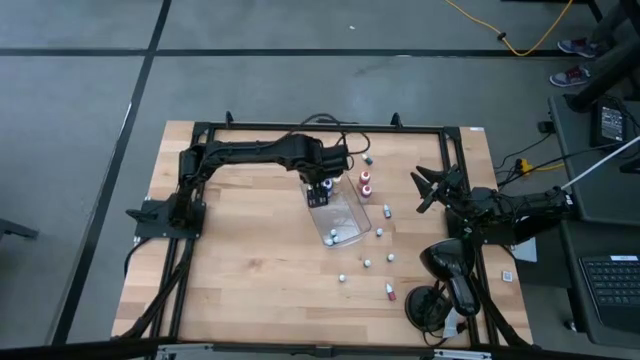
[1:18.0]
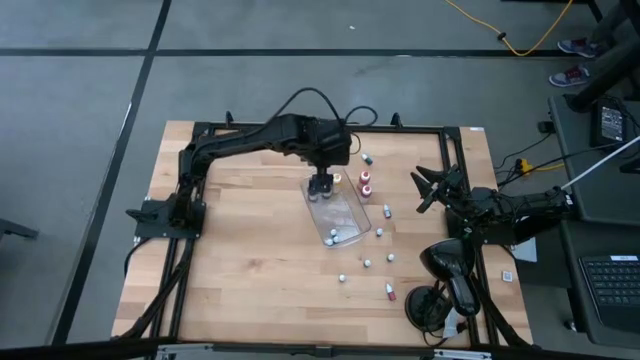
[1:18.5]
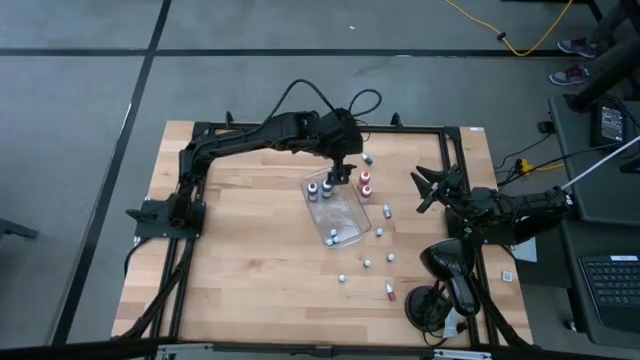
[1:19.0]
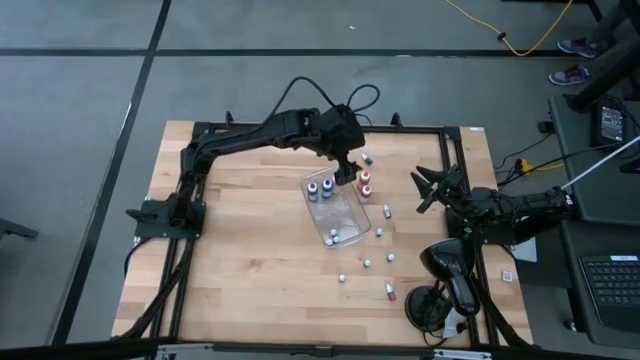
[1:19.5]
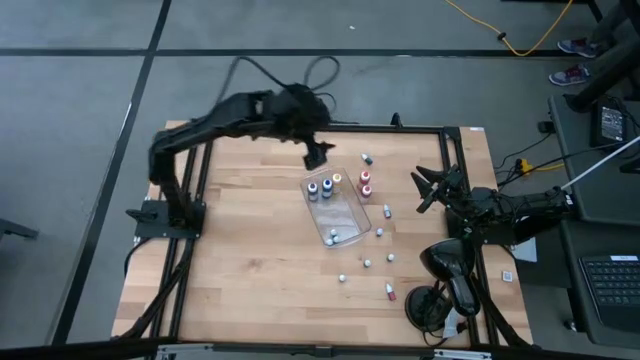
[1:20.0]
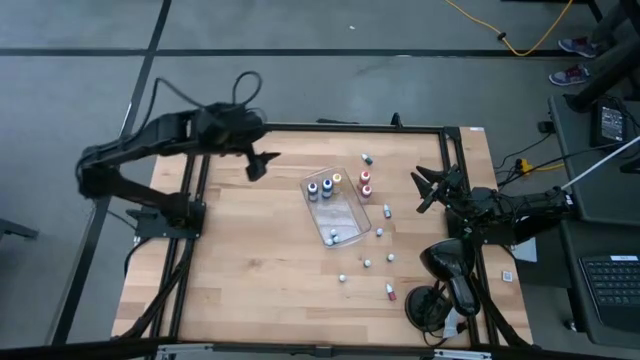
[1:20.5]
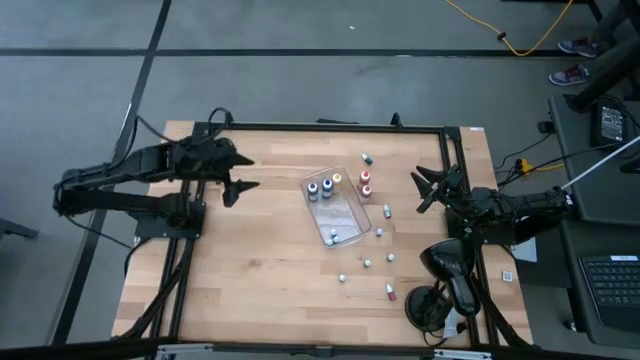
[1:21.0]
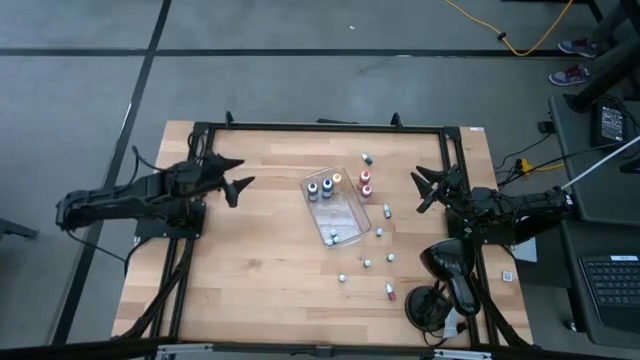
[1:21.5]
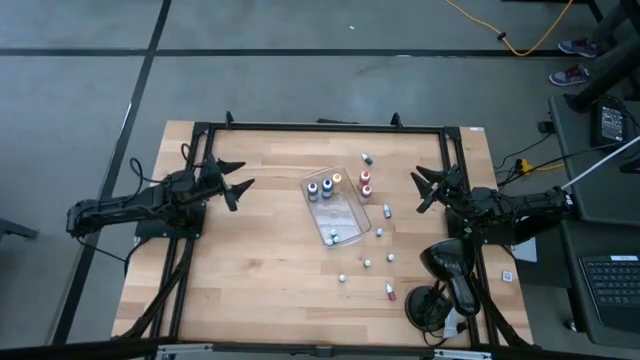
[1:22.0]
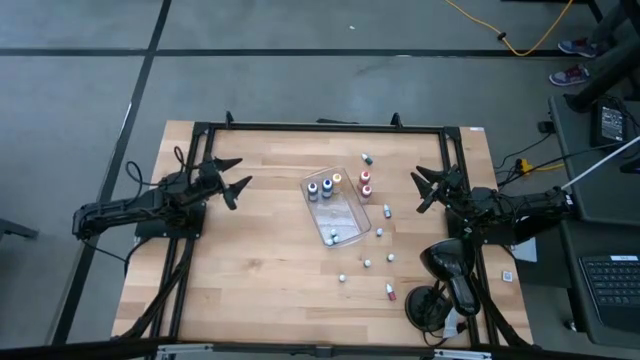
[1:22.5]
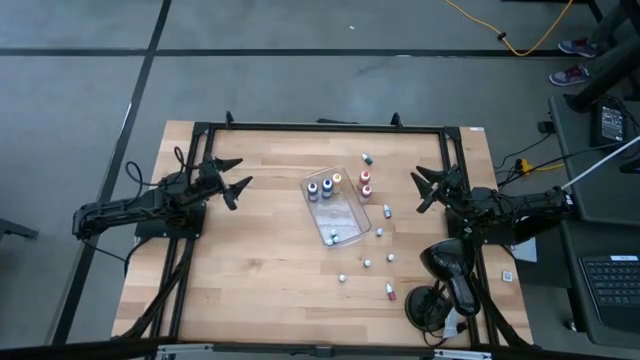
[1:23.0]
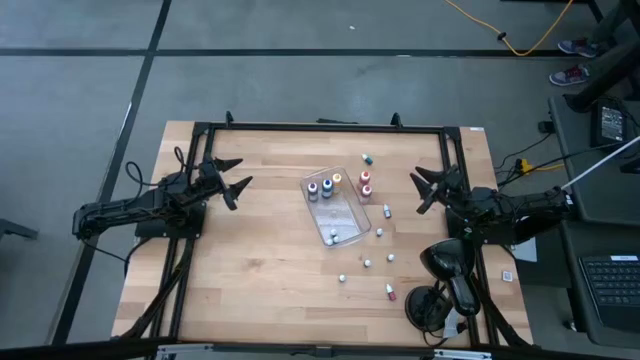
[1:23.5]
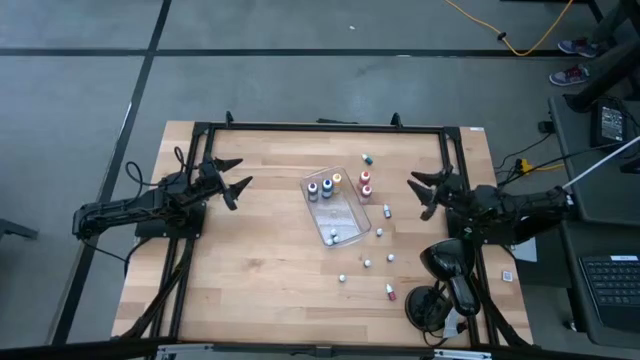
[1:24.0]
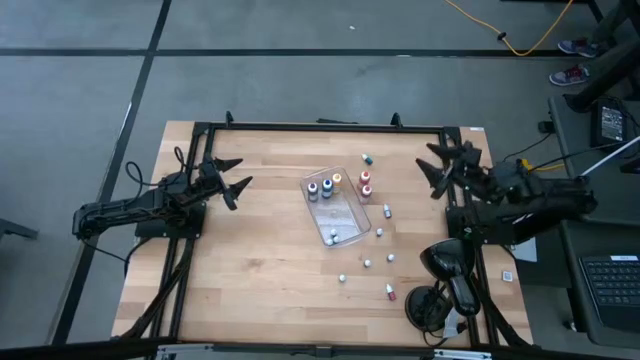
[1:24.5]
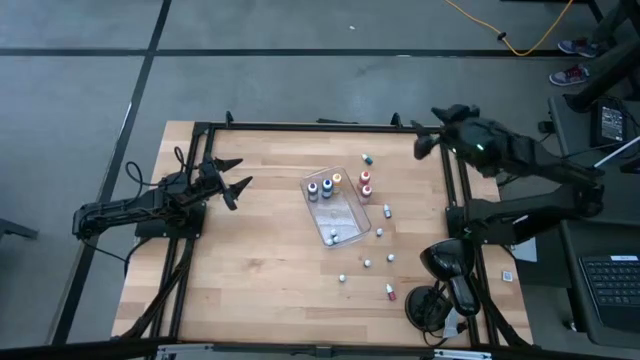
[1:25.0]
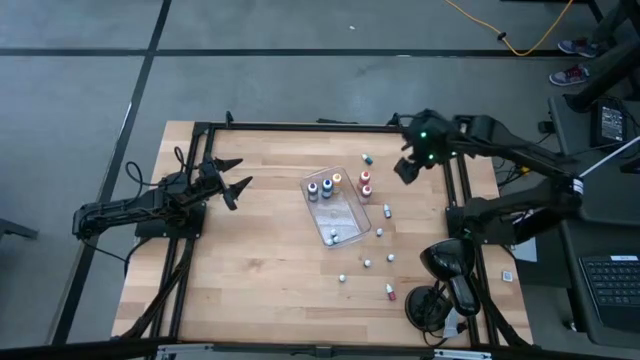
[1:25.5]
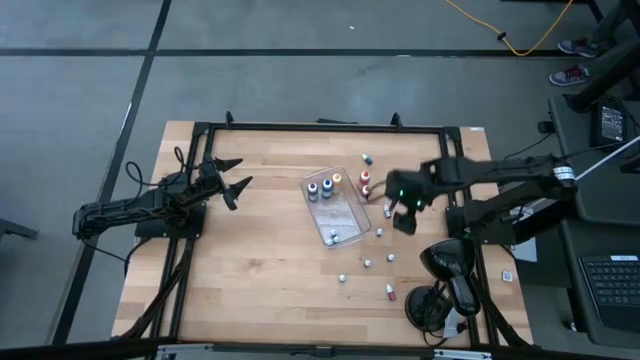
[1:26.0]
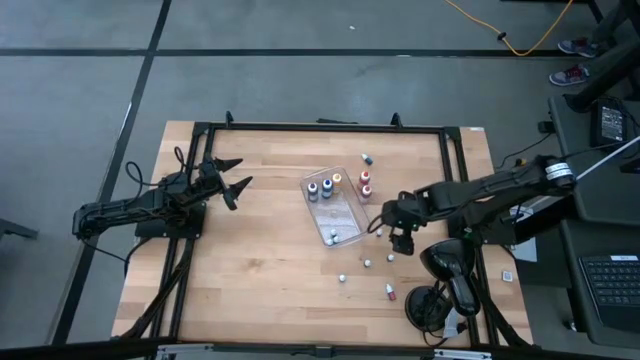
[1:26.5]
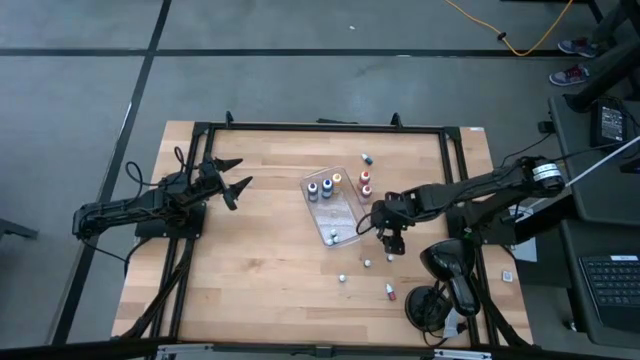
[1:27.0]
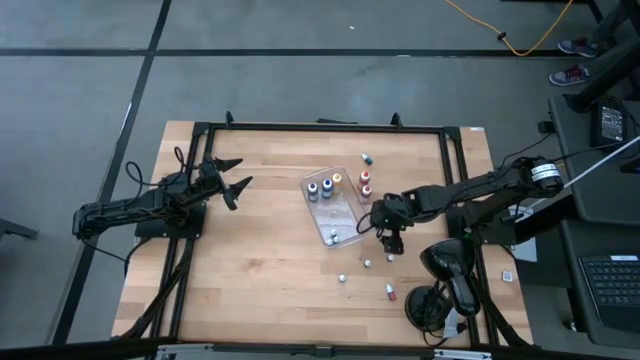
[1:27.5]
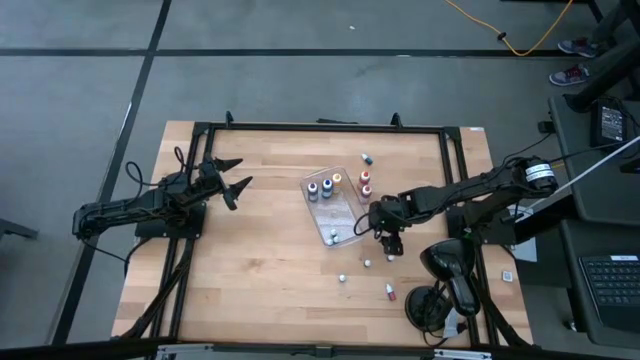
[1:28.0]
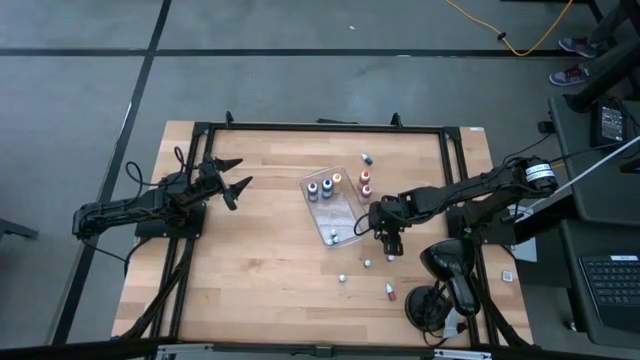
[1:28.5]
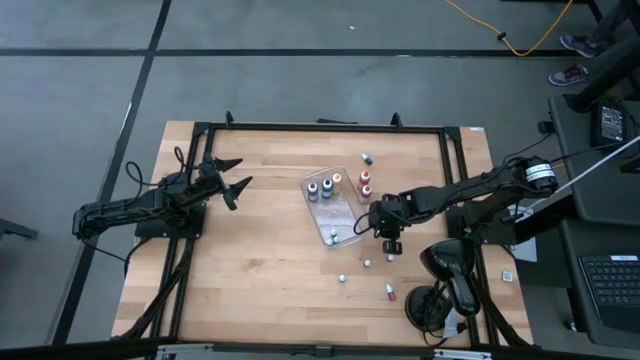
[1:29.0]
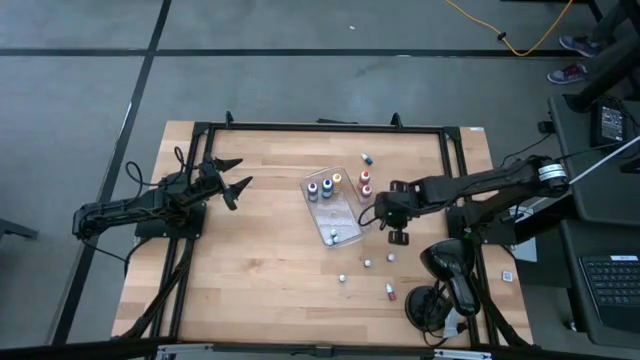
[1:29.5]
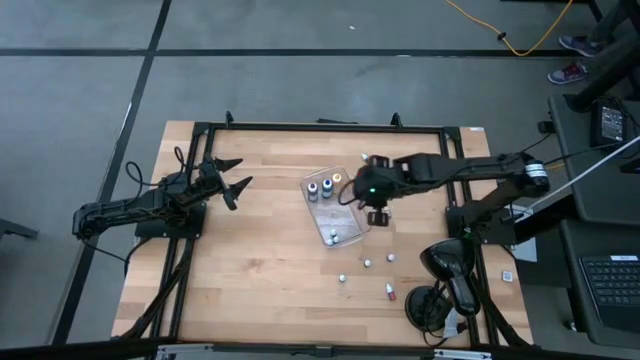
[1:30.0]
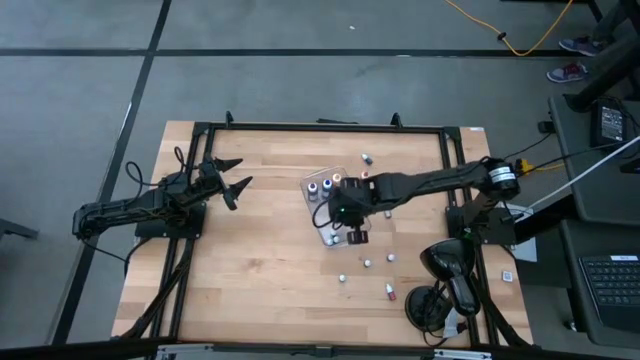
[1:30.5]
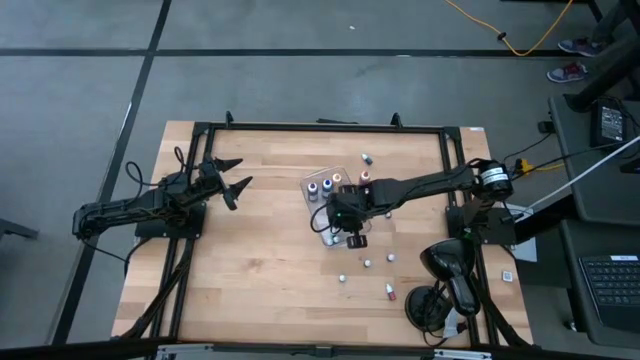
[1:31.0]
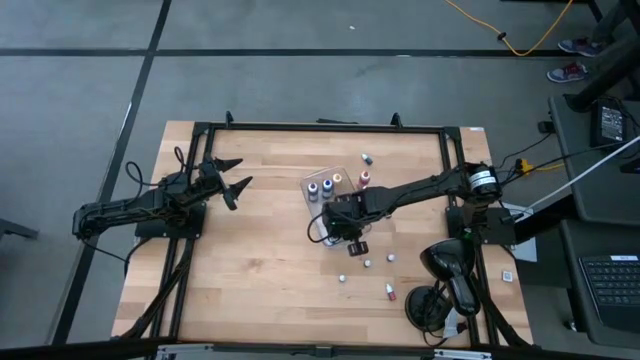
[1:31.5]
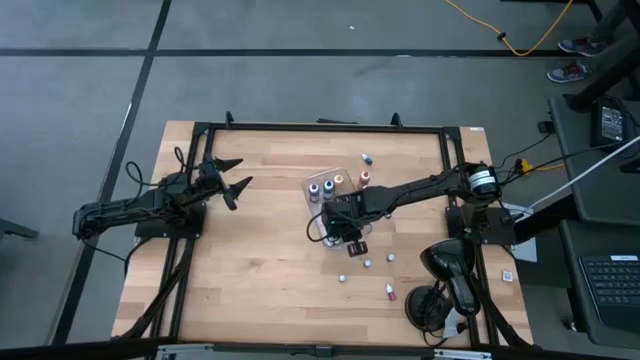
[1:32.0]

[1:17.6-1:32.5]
Task: Pick & Place food coloring
Put the top small red food coloring bottle into the bottom of the bin

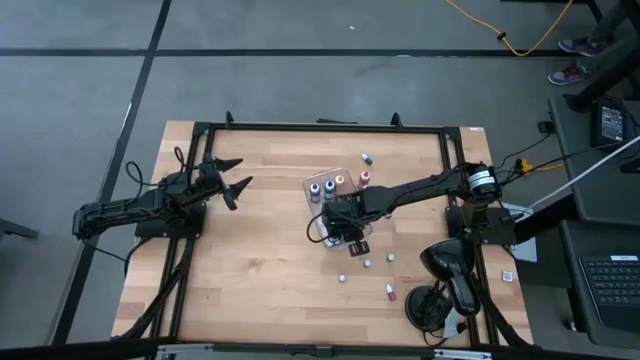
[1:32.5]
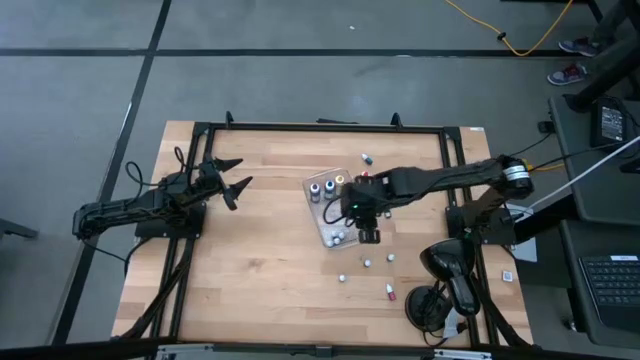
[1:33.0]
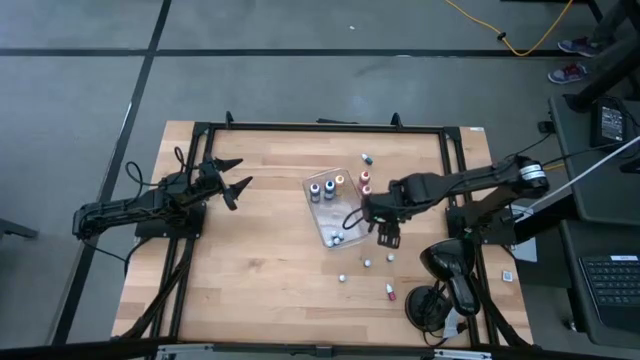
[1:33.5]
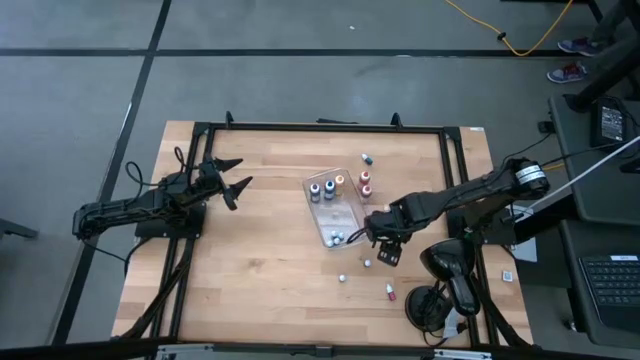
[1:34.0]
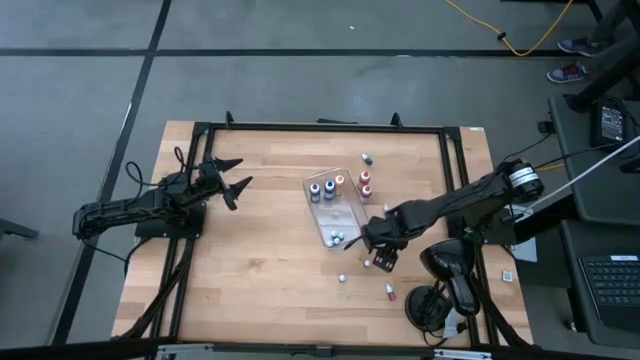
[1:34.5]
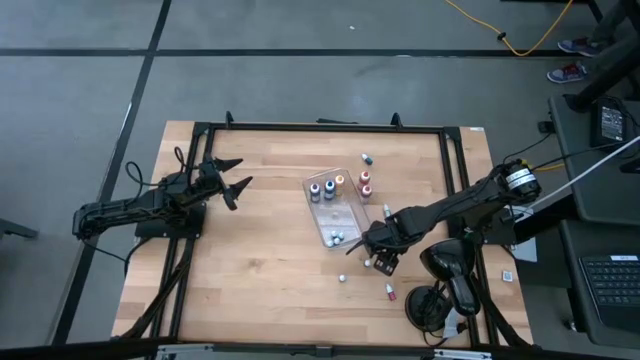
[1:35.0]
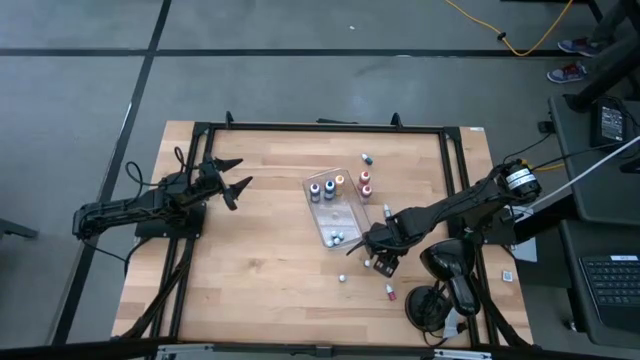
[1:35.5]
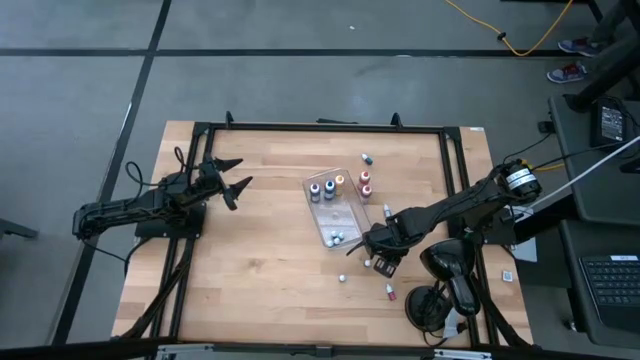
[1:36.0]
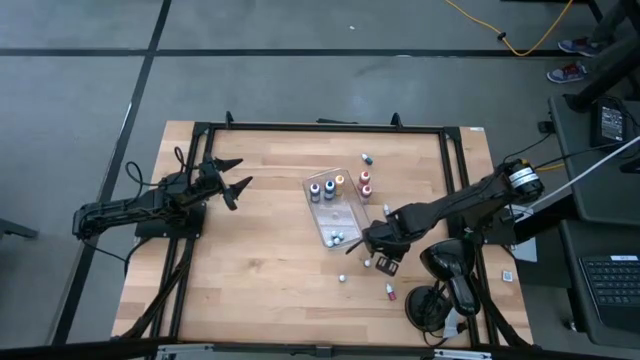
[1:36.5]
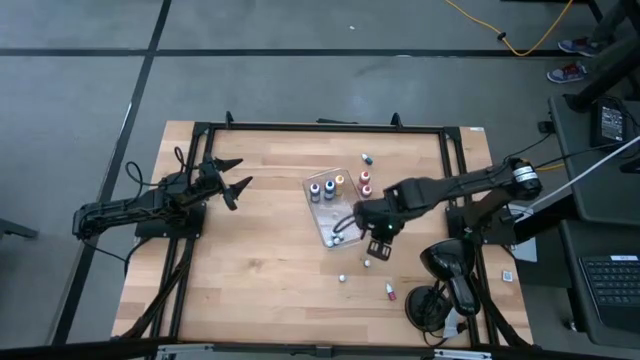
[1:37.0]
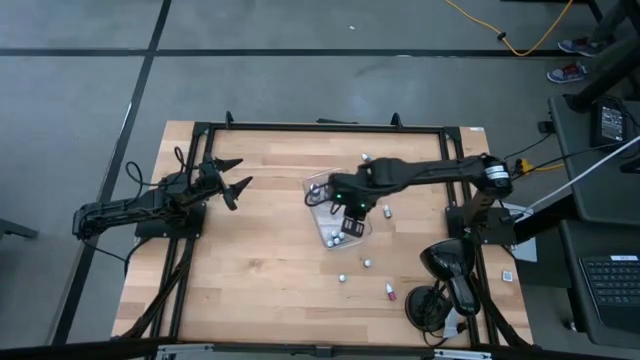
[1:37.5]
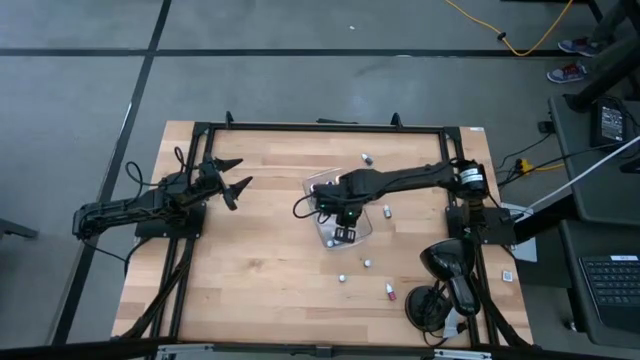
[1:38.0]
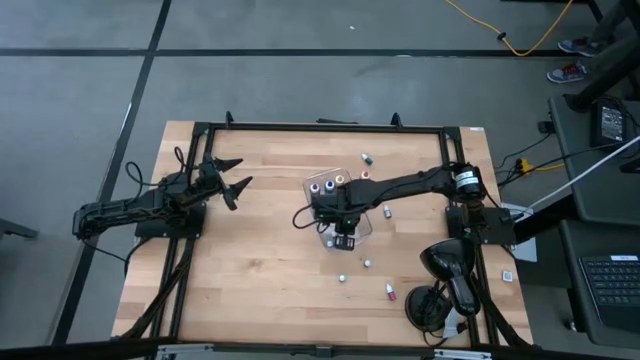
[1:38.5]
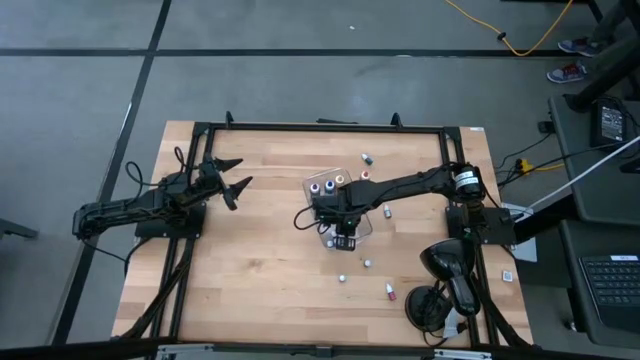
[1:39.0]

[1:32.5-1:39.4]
Put the right small black food coloring bottle into the bottom of the bin
